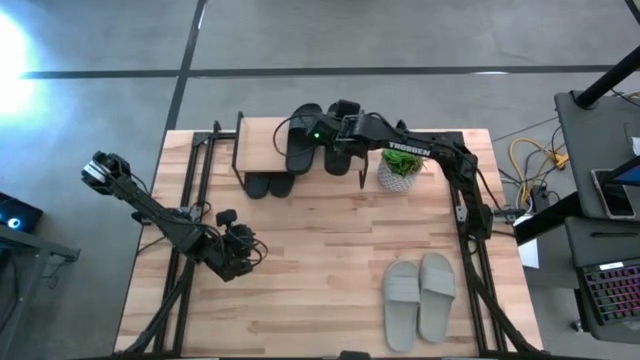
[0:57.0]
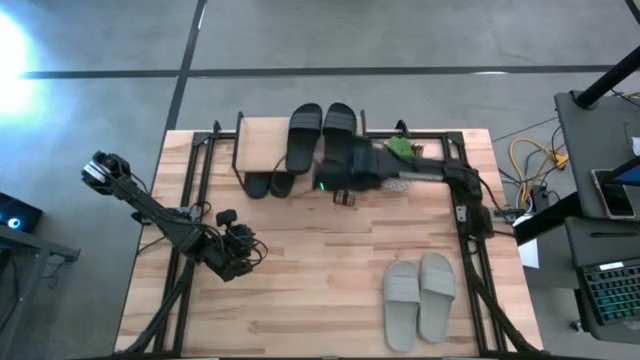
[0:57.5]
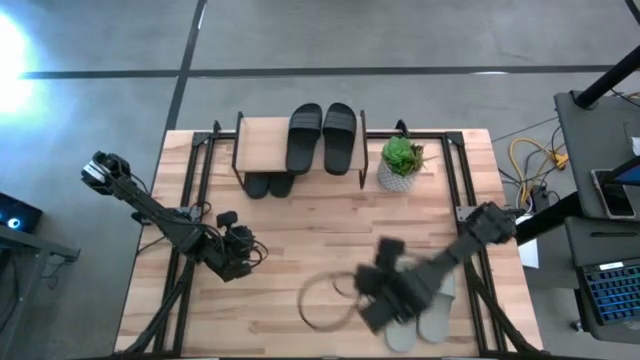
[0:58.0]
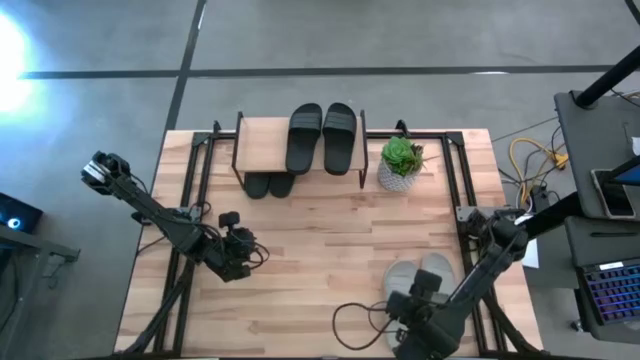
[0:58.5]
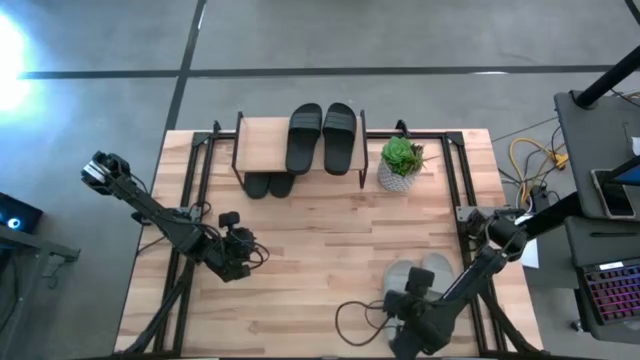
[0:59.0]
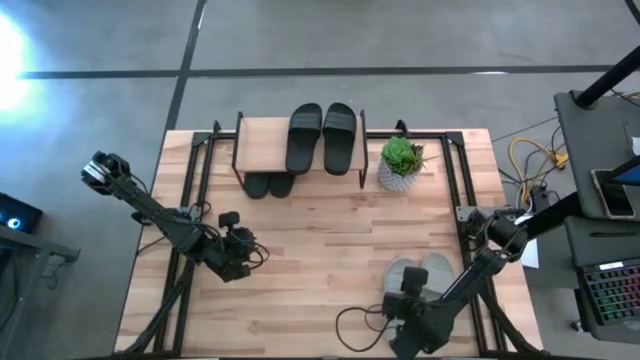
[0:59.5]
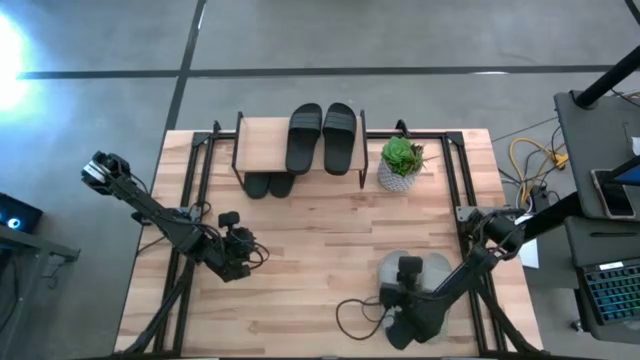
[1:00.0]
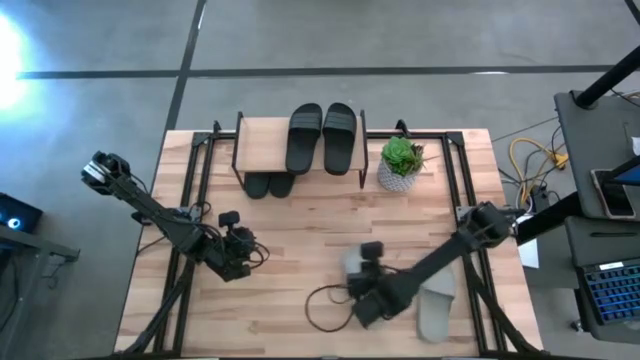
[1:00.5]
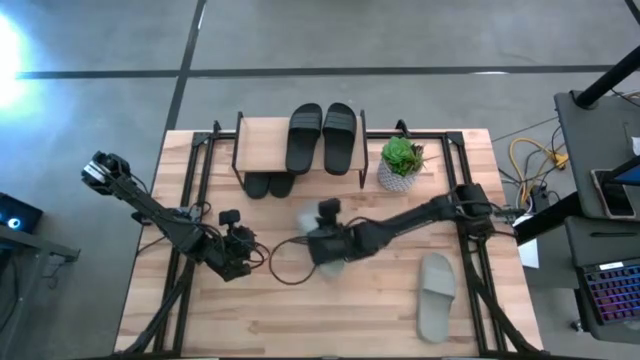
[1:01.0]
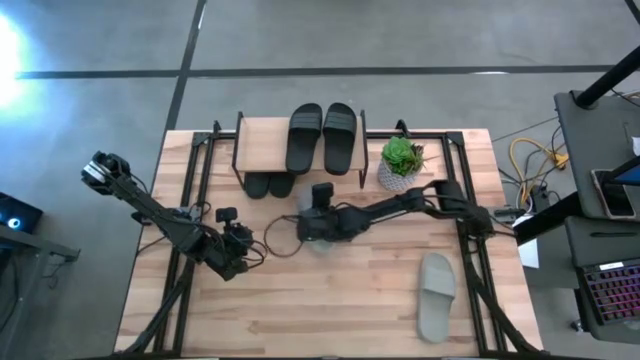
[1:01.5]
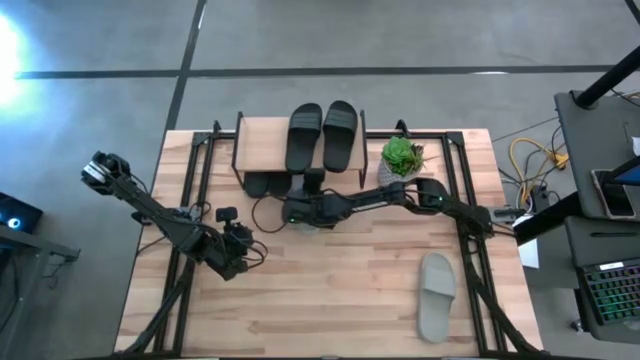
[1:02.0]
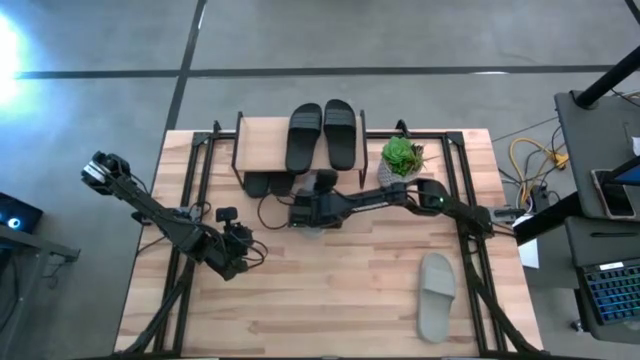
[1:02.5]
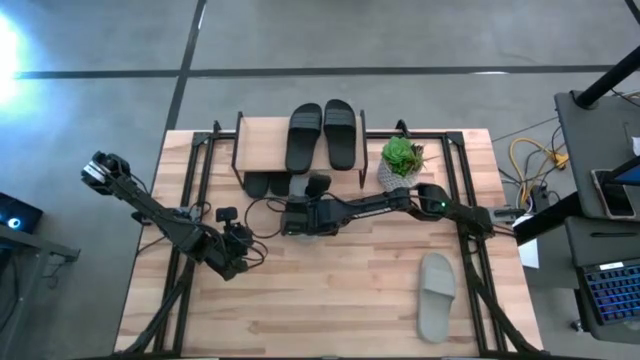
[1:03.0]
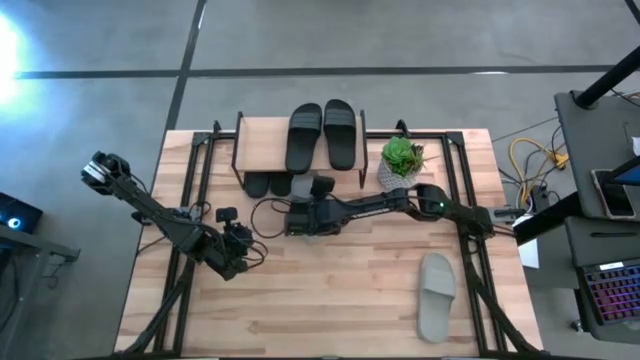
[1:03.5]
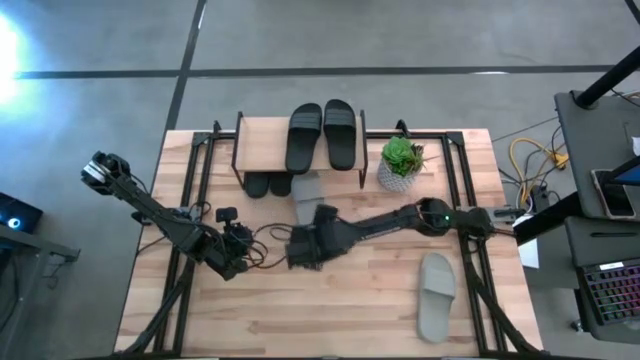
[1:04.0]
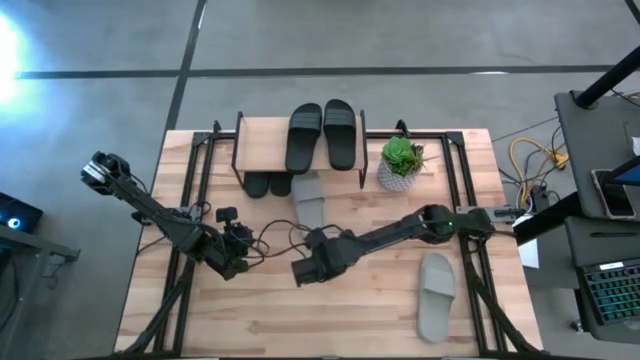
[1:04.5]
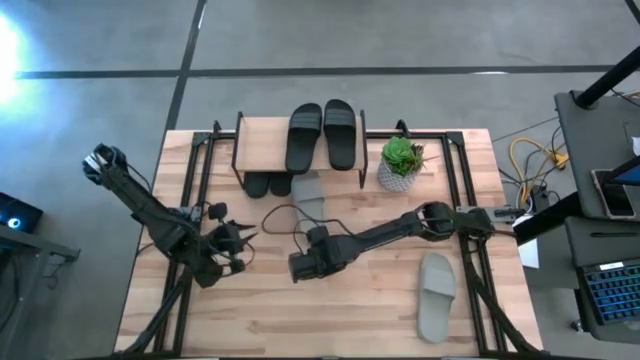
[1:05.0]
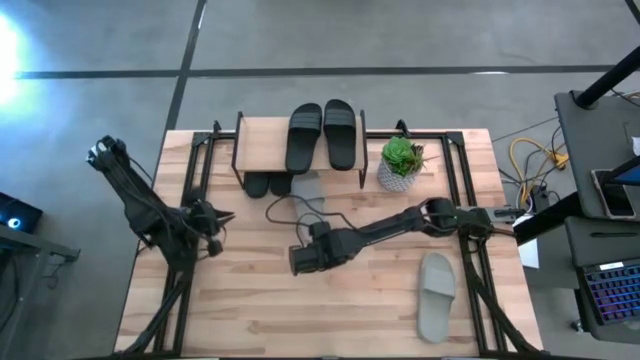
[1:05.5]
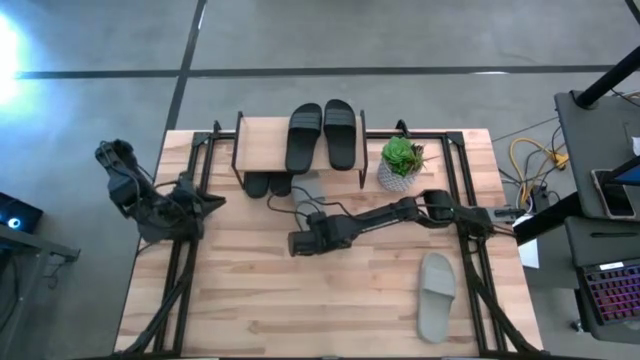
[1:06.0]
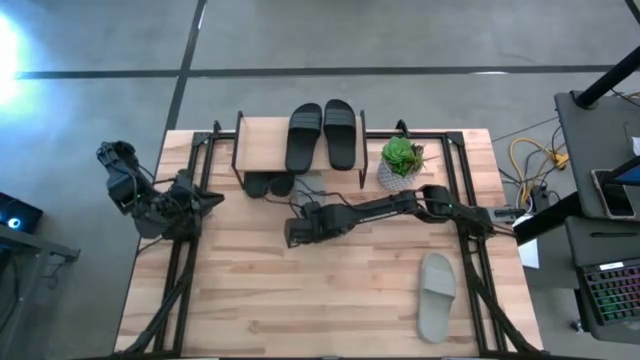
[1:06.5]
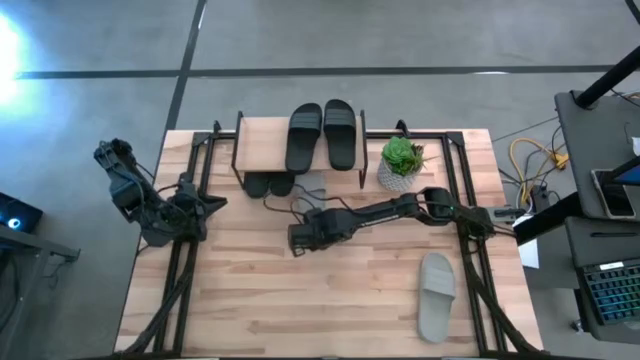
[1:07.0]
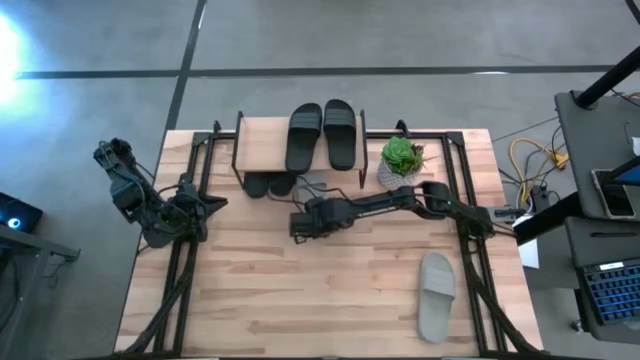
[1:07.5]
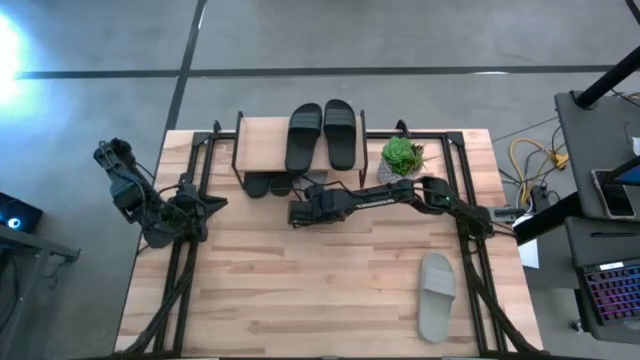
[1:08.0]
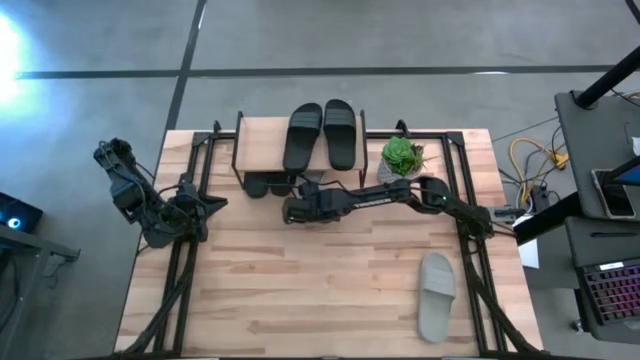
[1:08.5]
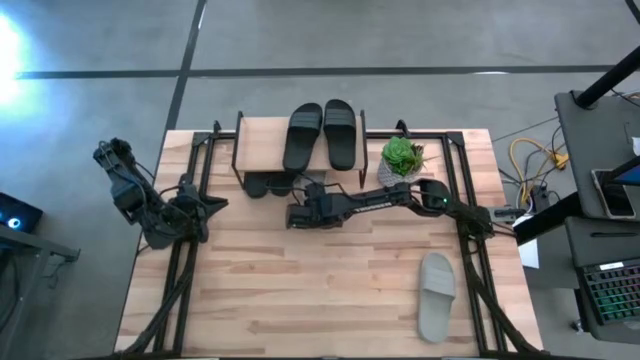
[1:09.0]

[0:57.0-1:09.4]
Task: Pick and place slides into the shelf
Put the gray slide under the shelf

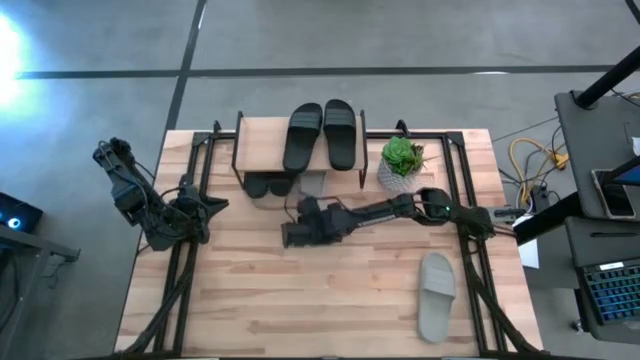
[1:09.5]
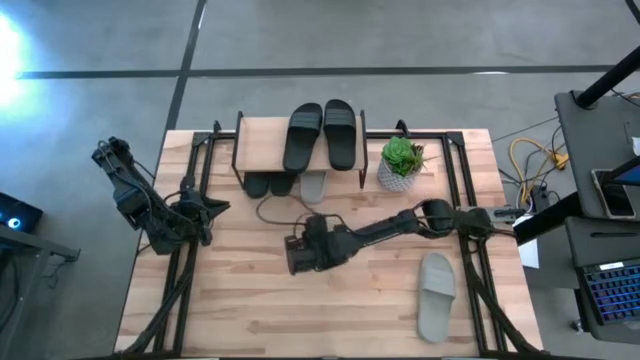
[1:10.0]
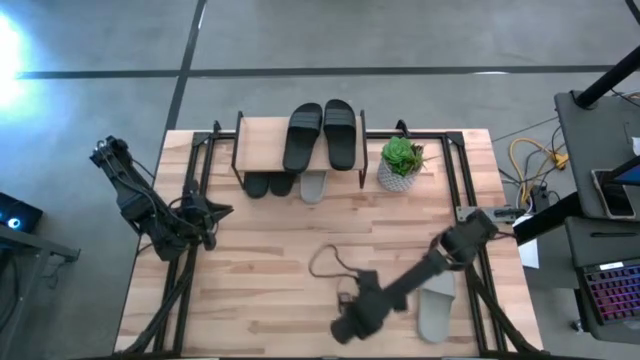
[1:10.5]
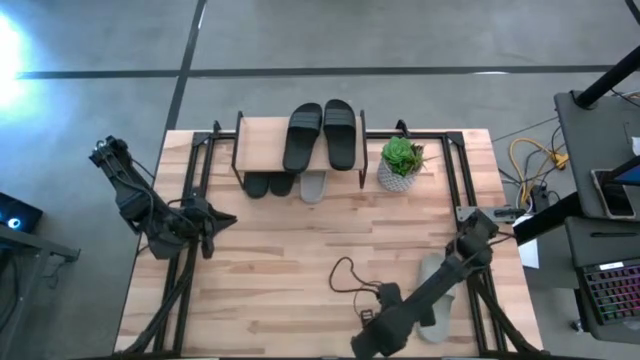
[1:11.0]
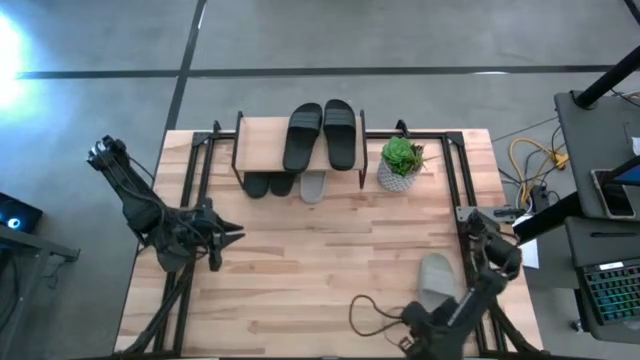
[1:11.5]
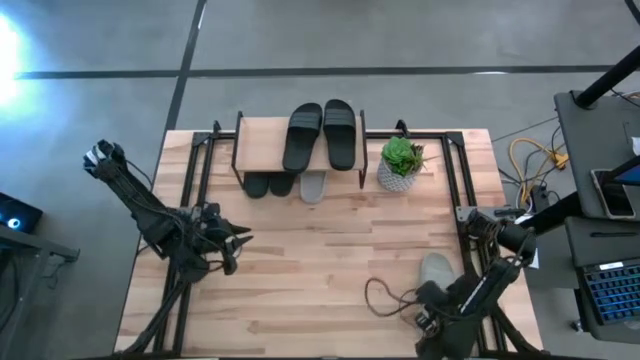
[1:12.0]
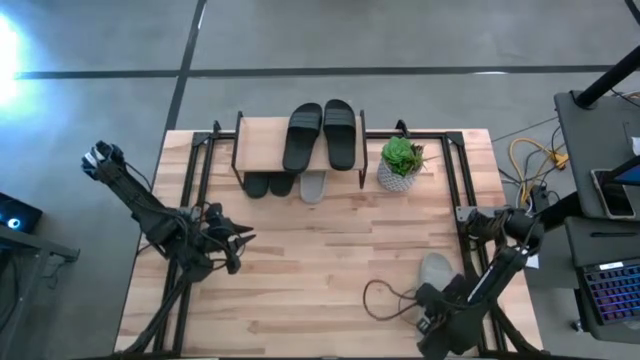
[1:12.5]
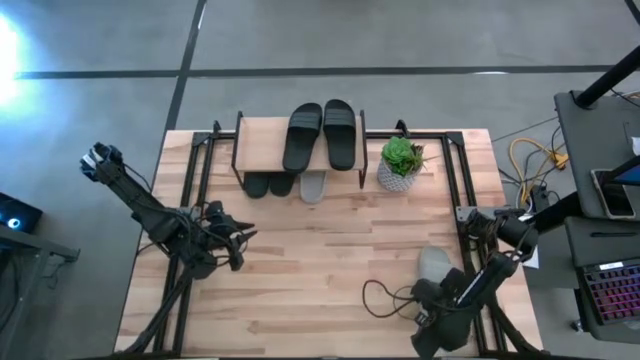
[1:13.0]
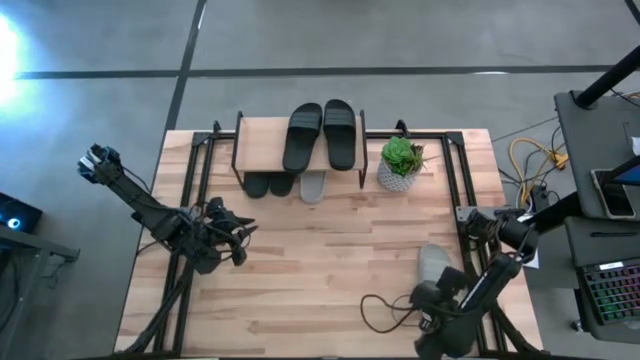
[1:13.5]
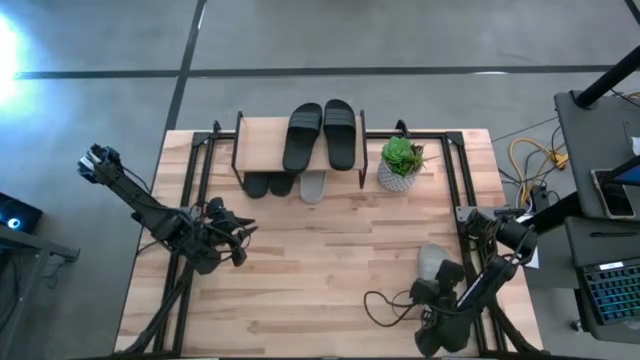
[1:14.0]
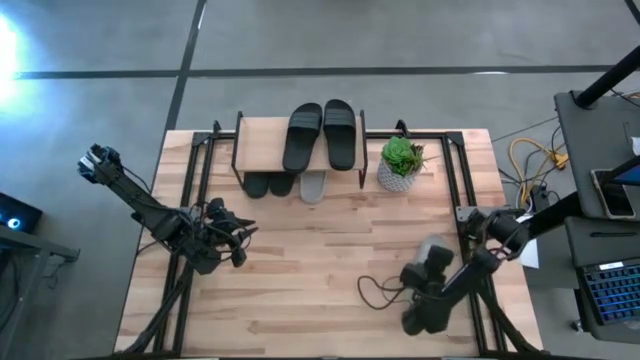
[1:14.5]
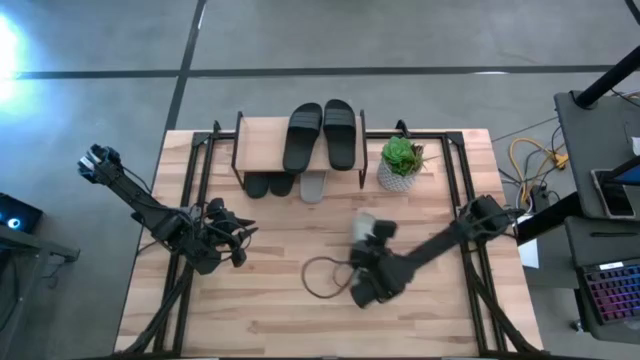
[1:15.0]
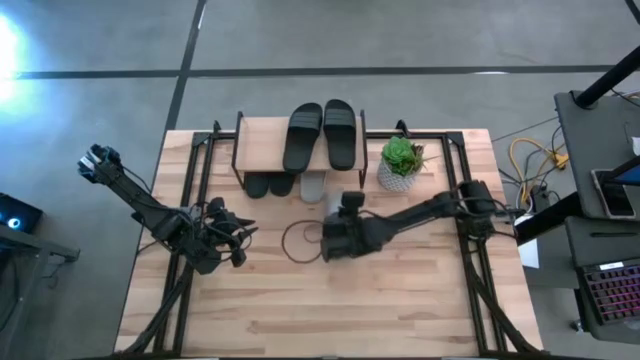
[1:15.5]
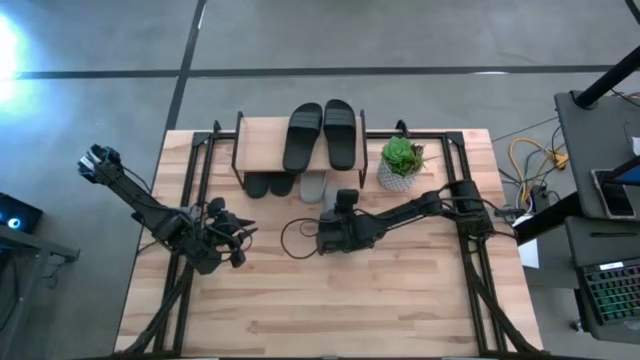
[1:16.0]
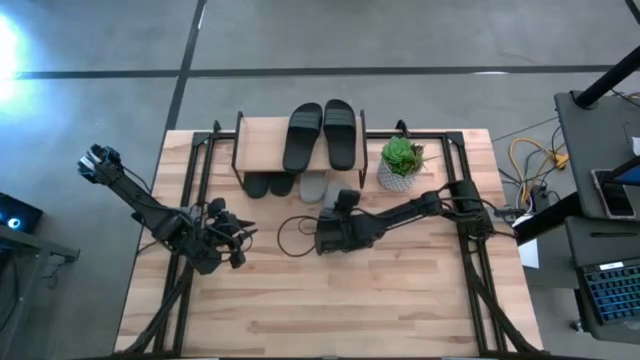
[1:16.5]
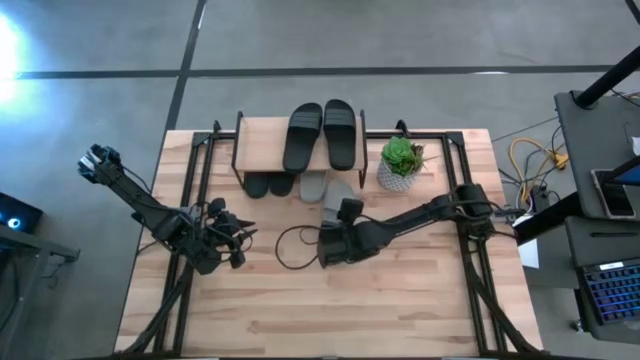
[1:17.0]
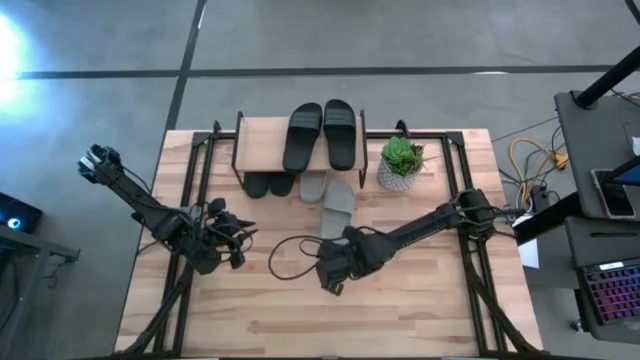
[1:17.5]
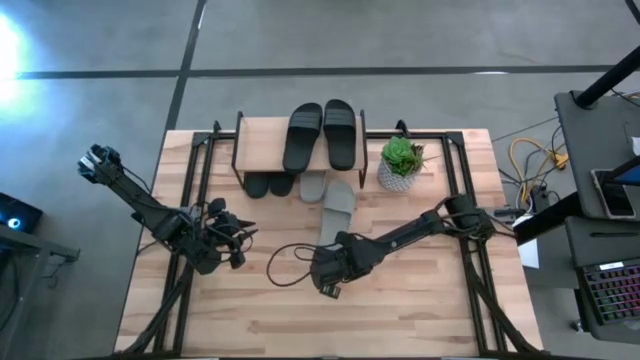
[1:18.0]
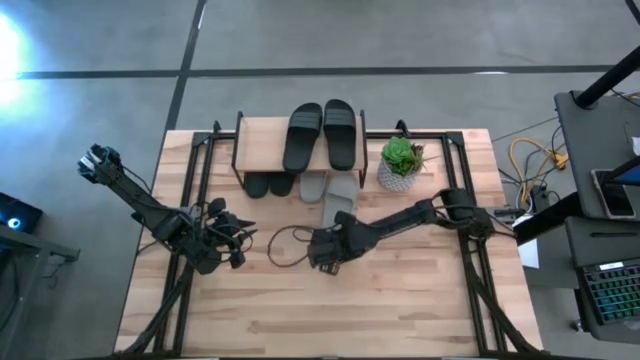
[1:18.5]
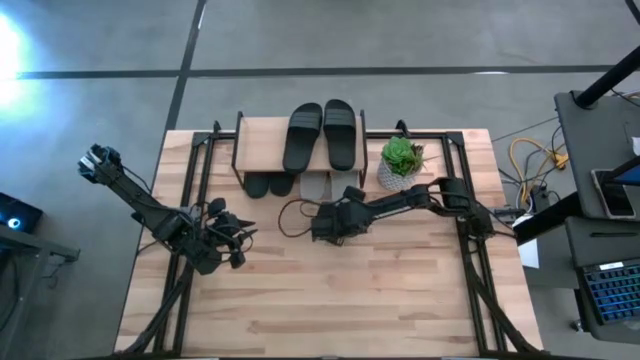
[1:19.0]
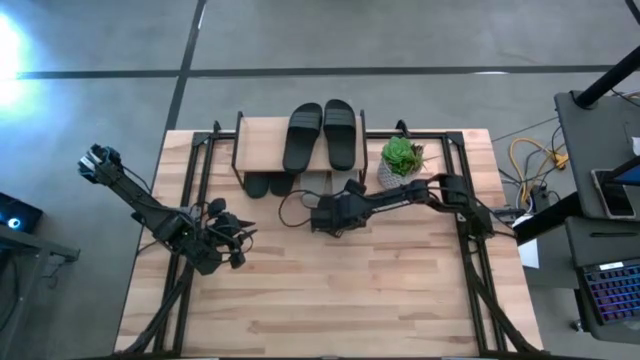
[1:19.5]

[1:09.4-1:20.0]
Put the gray slide under the shelf

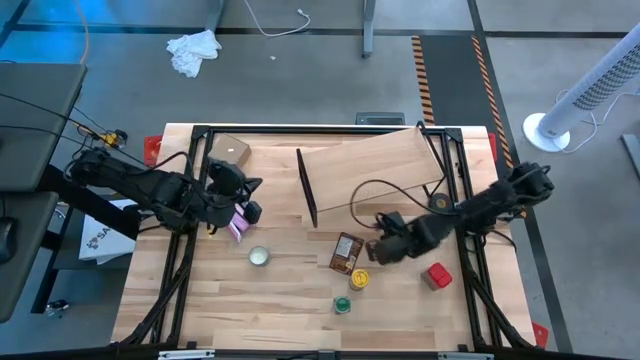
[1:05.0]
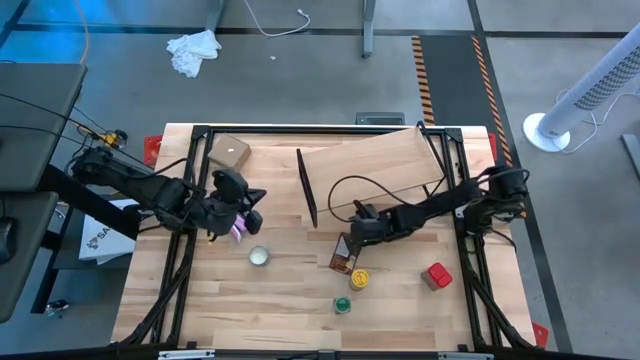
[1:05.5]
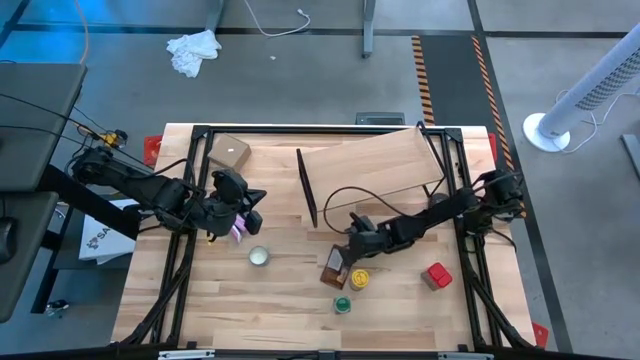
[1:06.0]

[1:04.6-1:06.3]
Task: Shelf spices
Adjust the orange spice pack
